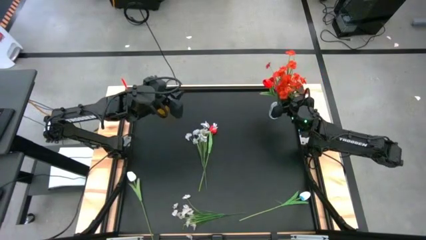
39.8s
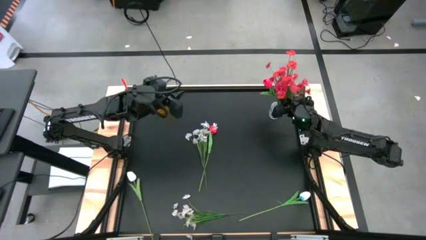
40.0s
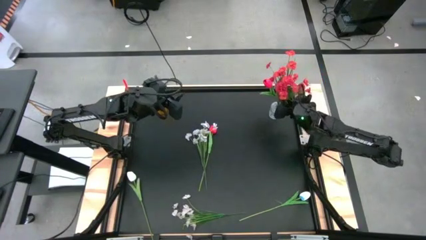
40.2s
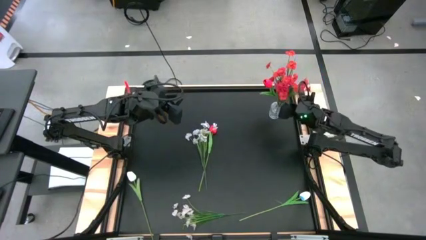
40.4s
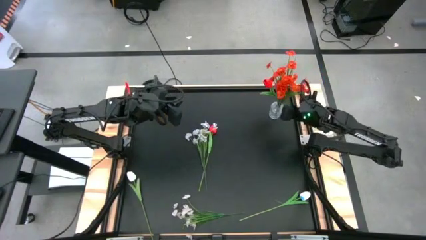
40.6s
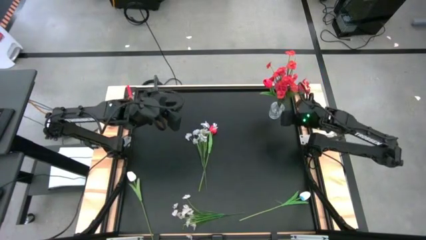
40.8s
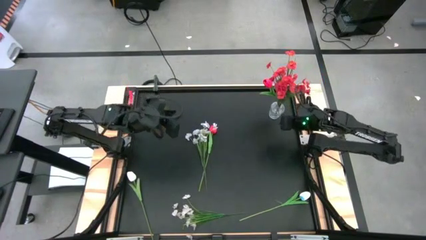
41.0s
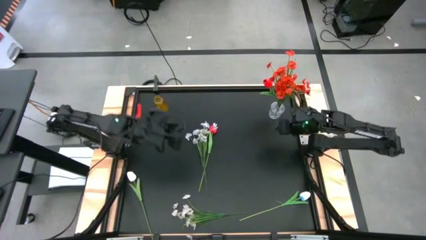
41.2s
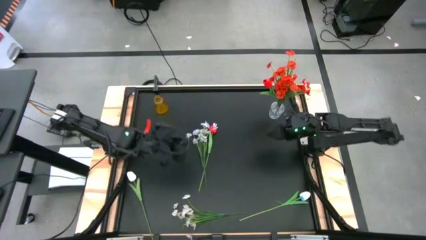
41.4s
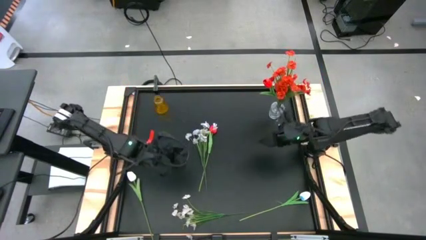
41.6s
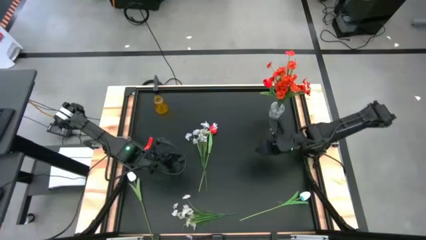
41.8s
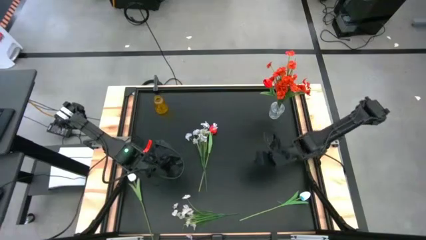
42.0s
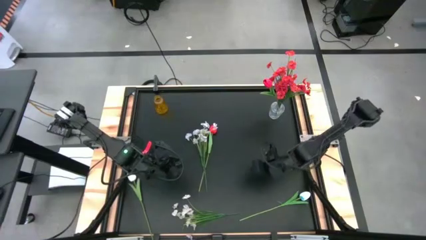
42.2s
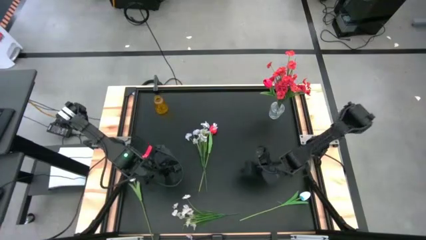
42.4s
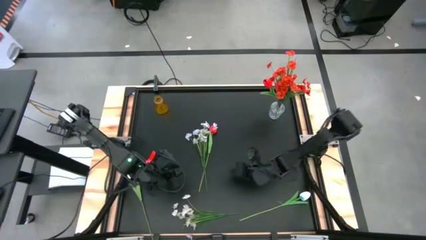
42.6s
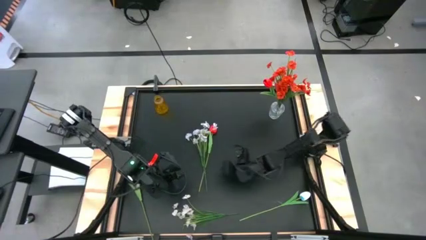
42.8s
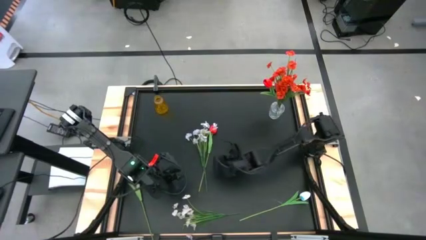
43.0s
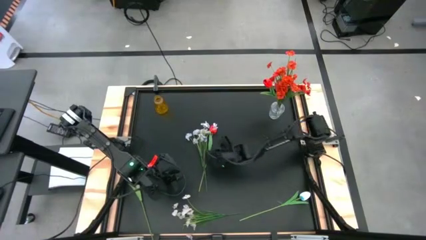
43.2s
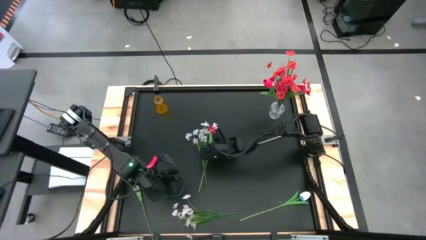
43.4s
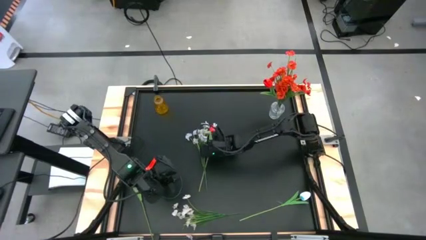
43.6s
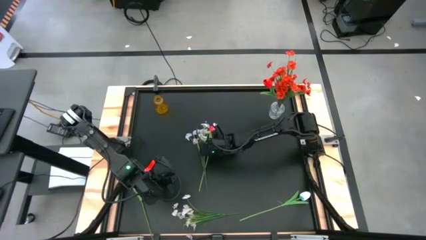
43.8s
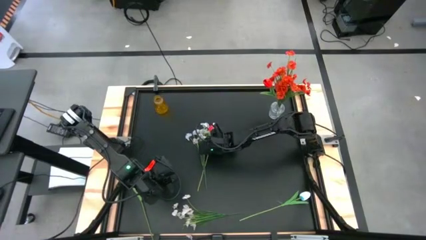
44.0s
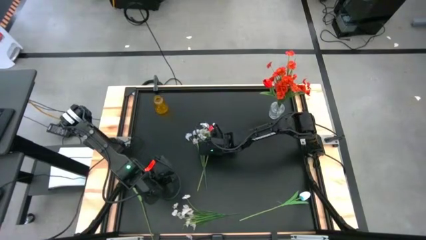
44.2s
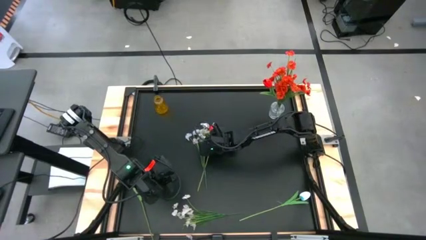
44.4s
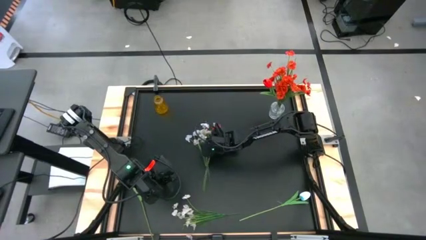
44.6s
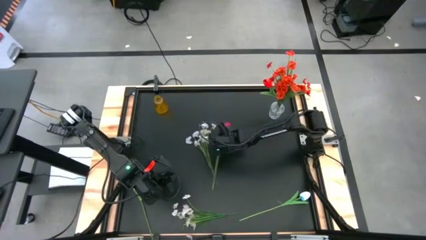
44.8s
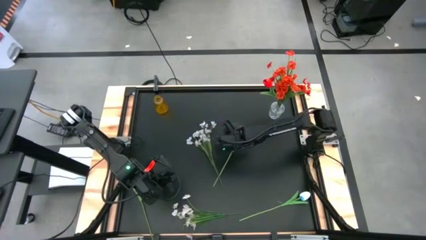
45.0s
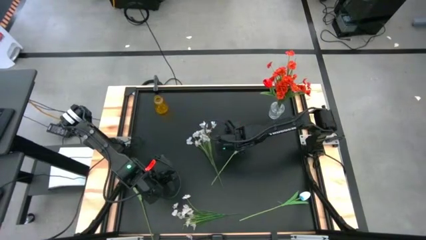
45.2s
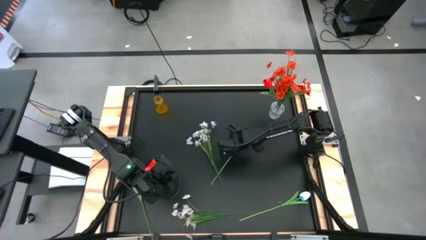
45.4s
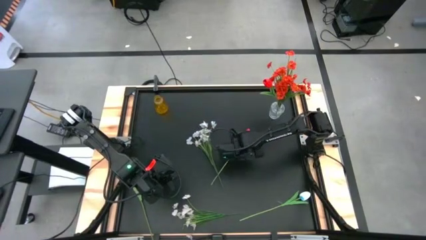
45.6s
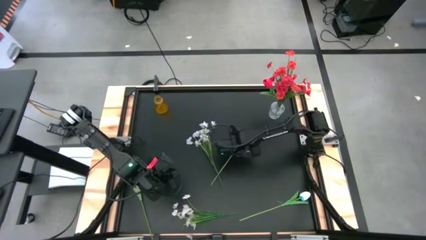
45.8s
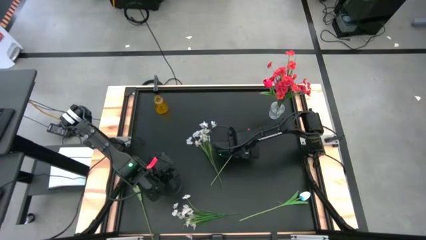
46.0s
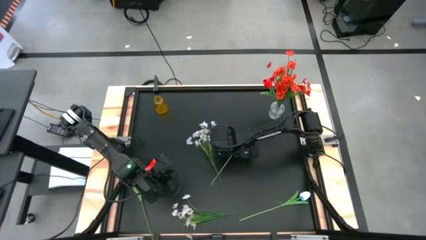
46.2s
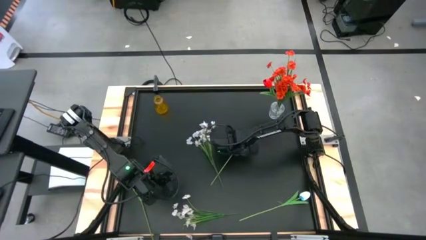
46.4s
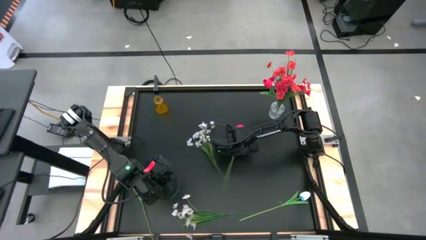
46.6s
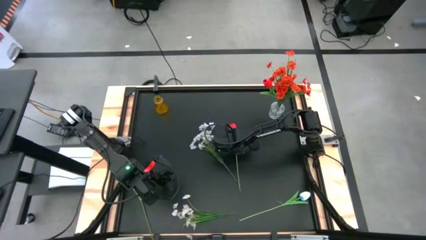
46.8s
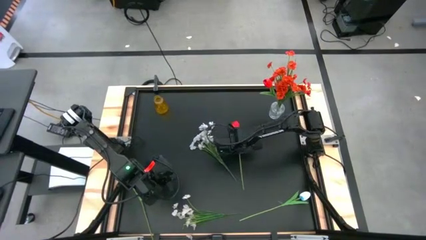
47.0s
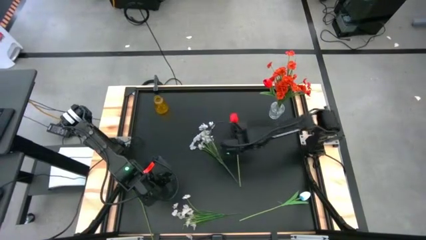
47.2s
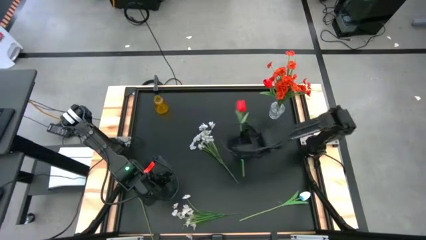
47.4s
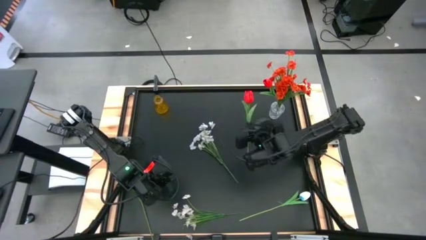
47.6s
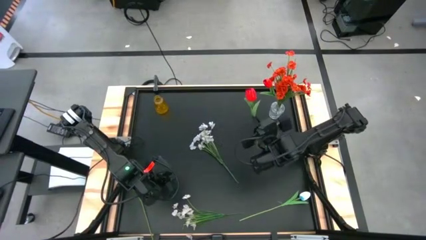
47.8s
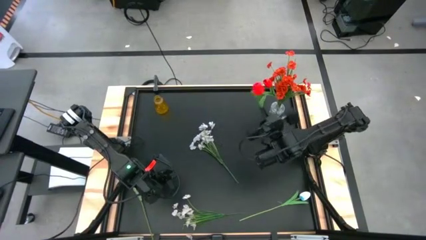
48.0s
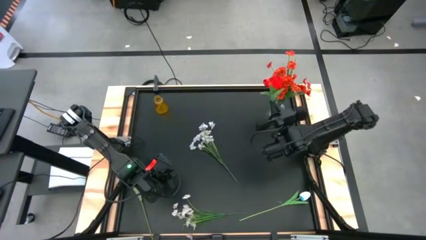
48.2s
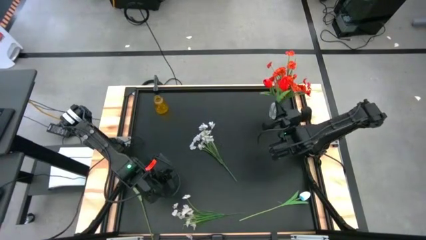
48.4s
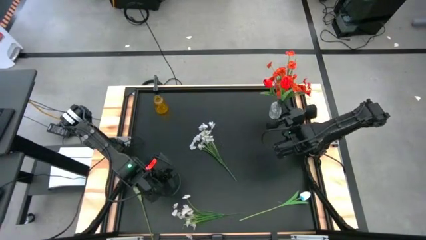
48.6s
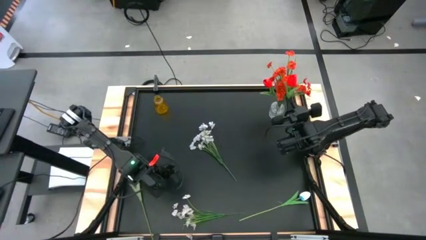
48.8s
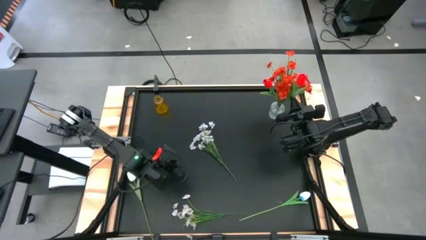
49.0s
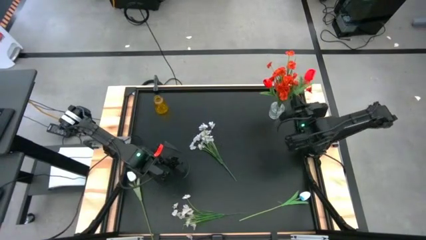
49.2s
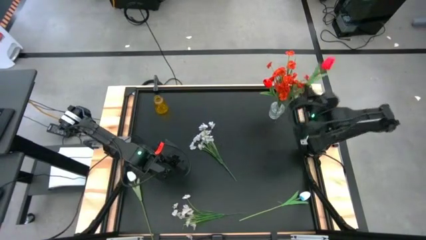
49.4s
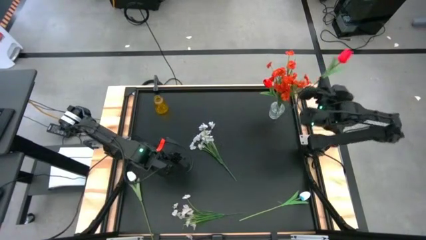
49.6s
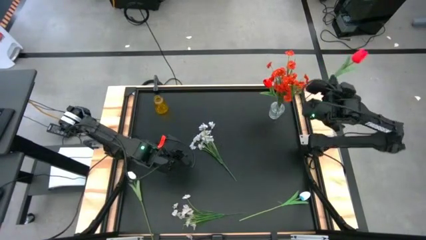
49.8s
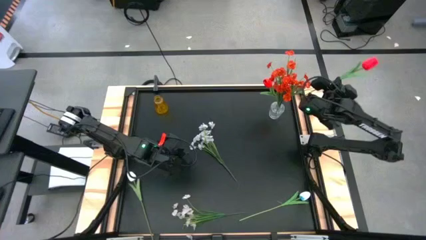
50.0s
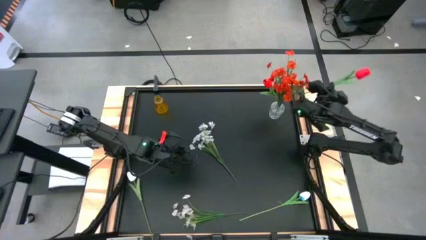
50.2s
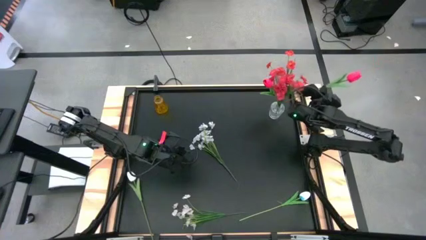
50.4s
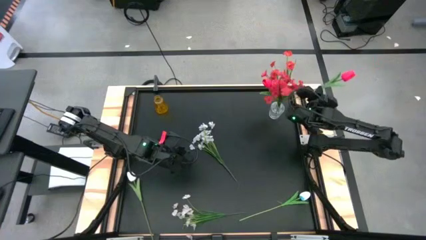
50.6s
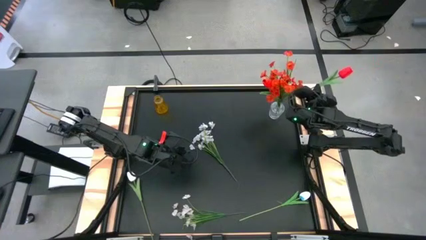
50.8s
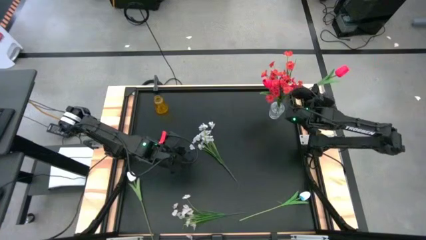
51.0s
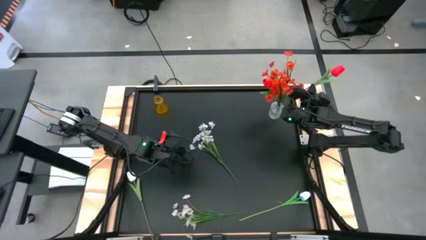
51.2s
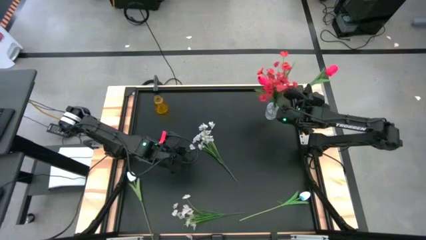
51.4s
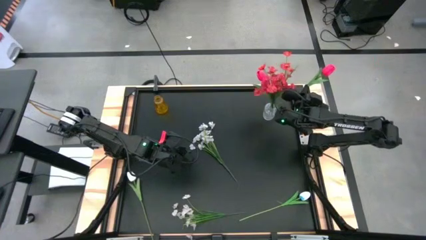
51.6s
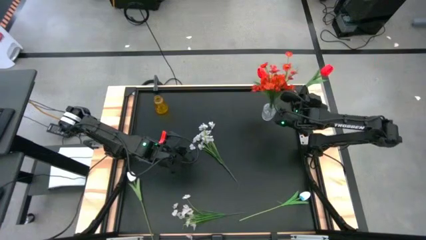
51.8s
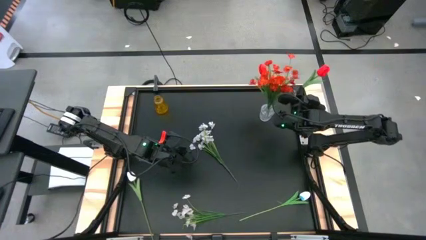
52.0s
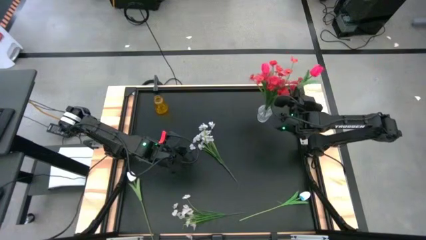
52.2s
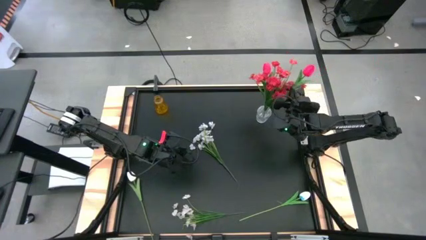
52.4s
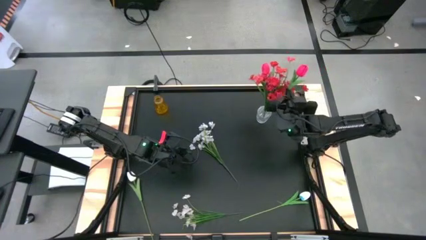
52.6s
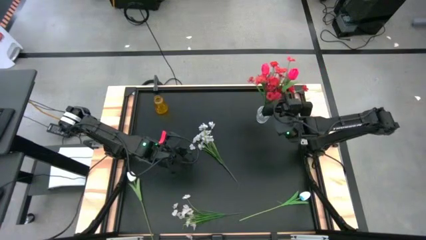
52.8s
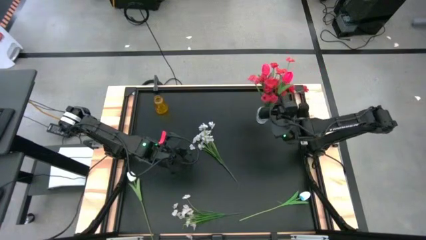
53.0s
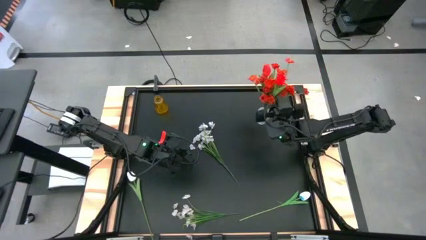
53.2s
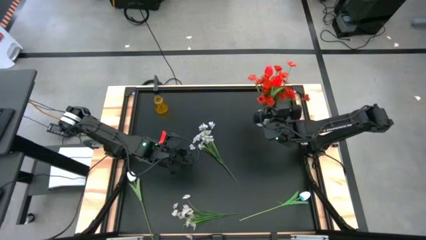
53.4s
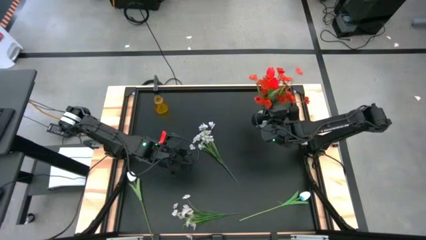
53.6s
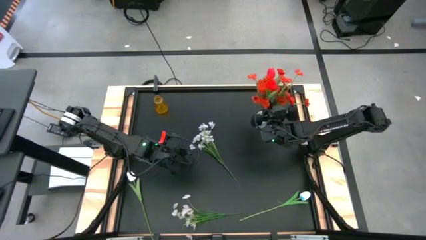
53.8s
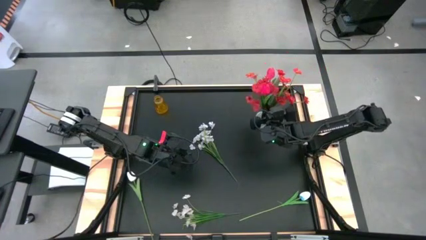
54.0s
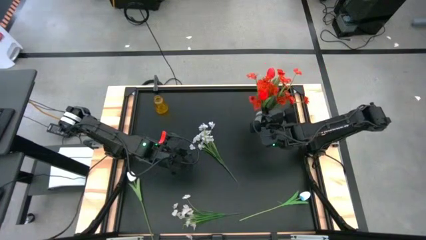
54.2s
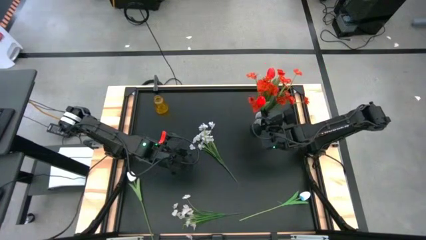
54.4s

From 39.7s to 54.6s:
Task: Sort flowers into vase by color
Put the red flower into the transparent vase

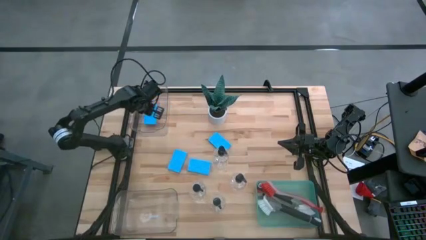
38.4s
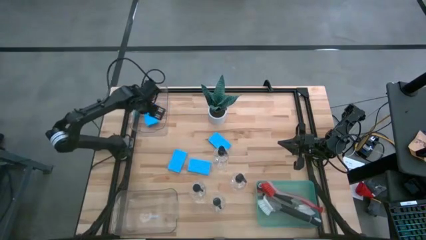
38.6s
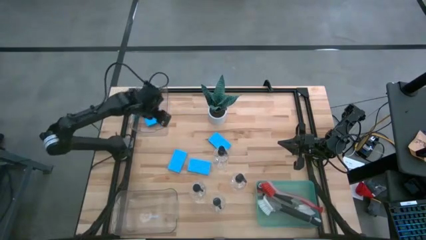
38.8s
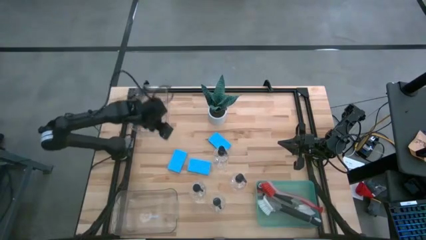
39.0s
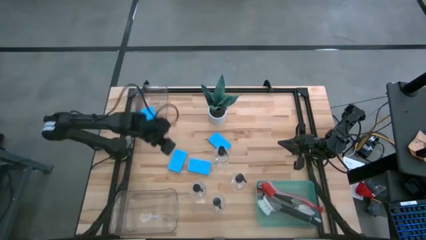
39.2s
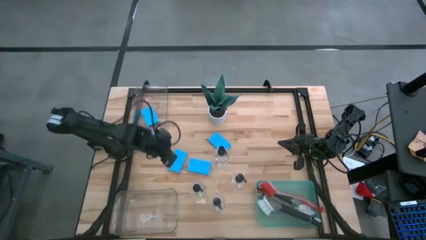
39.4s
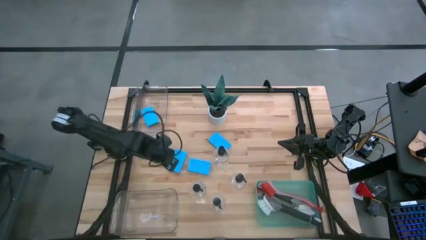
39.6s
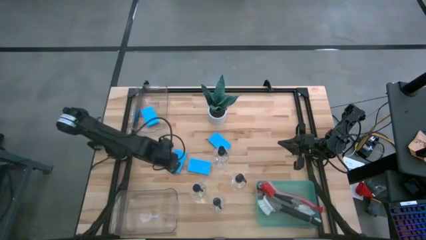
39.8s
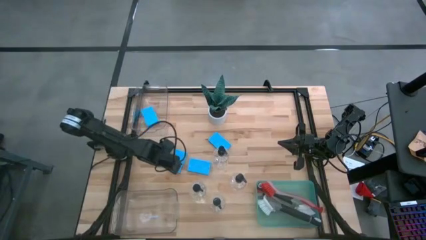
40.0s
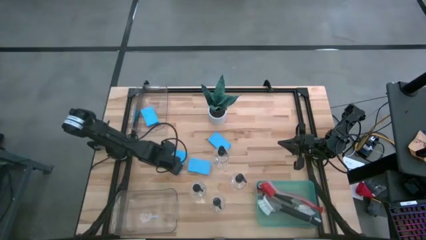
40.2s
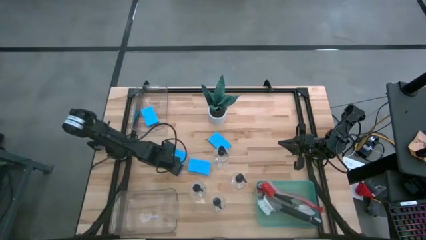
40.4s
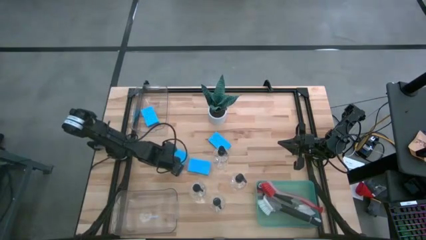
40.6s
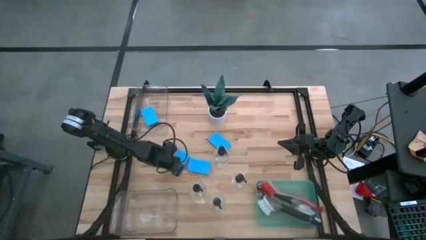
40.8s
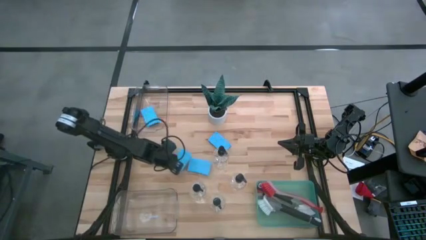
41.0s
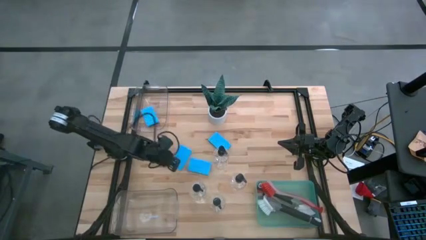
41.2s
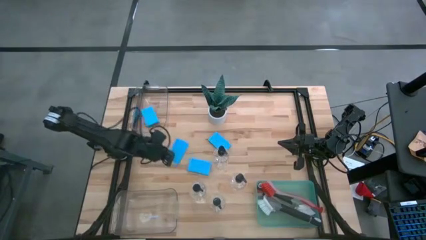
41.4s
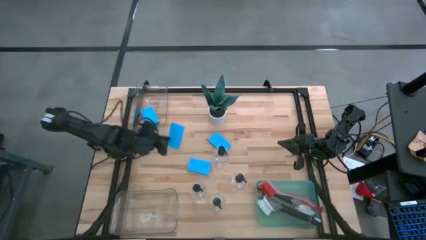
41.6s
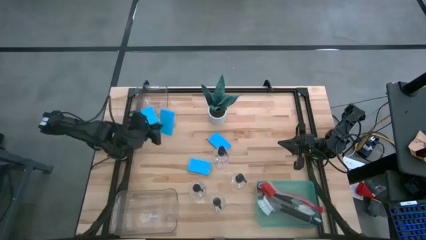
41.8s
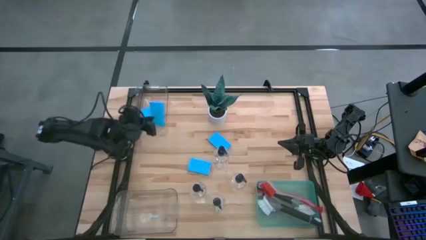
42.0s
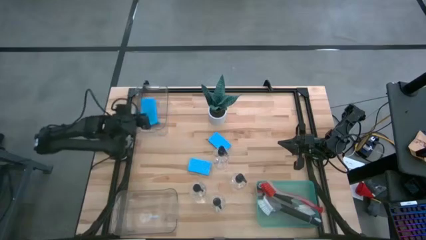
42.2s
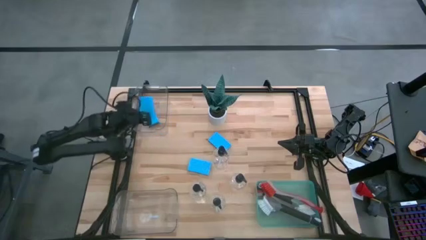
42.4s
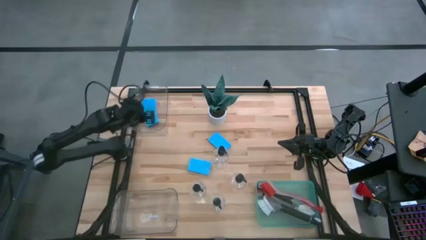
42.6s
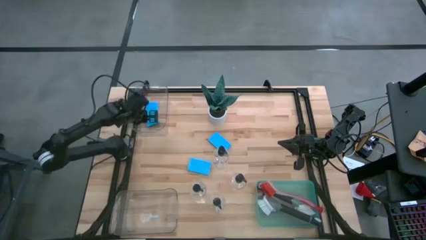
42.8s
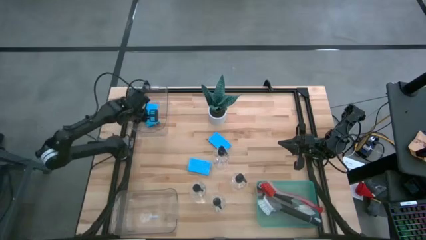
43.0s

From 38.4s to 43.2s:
Task: Pick & Place Kitchen Sink Supplies
Put the blue sponge into the top transparent bin
